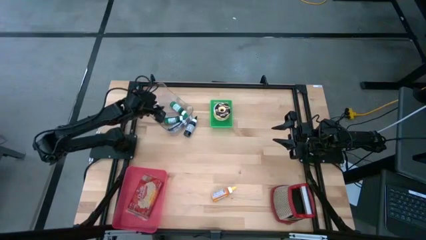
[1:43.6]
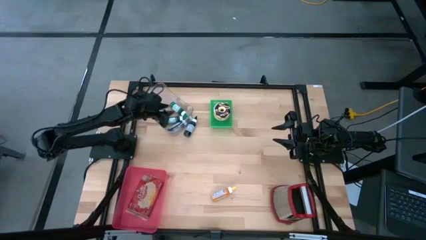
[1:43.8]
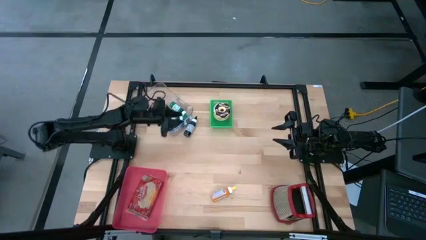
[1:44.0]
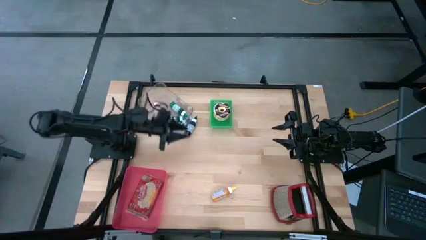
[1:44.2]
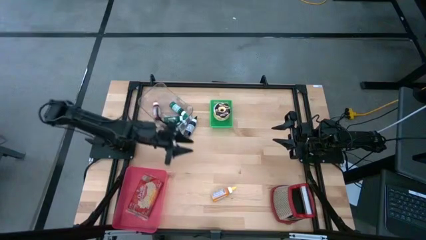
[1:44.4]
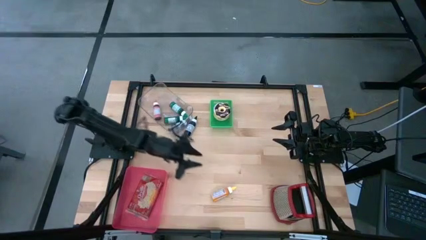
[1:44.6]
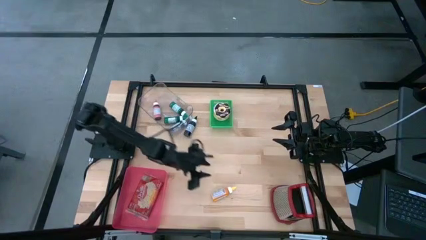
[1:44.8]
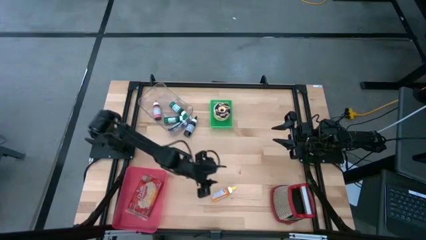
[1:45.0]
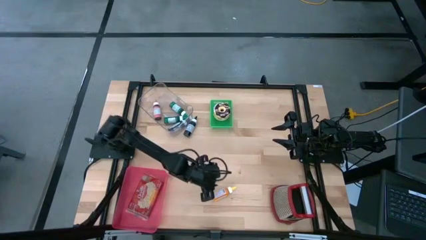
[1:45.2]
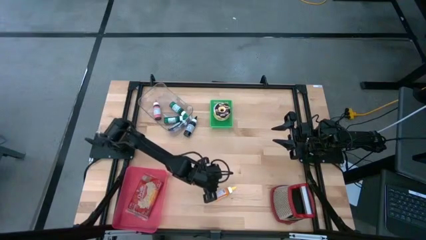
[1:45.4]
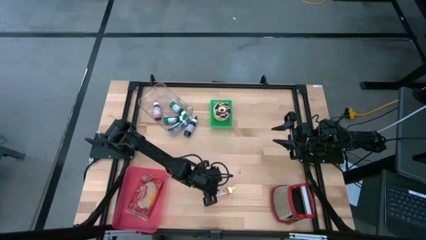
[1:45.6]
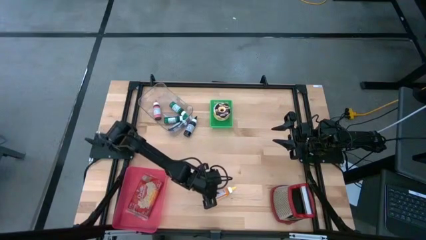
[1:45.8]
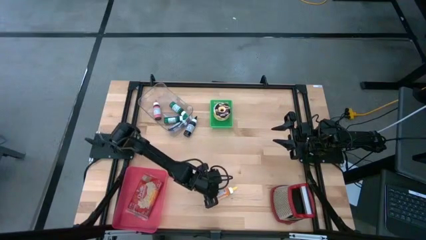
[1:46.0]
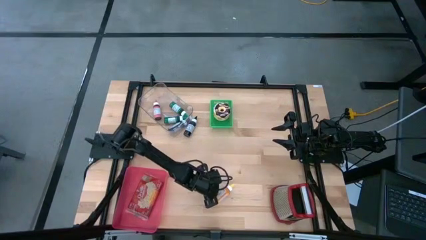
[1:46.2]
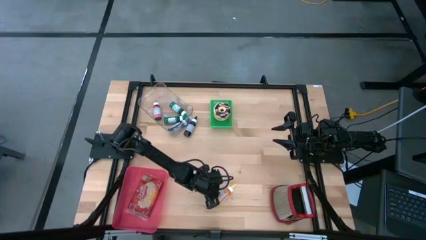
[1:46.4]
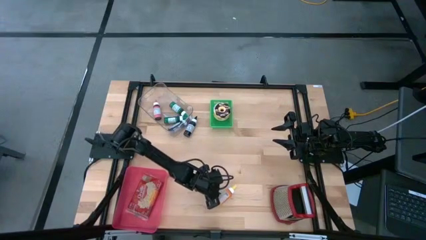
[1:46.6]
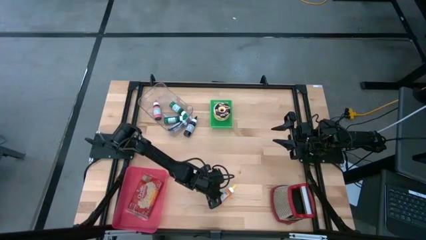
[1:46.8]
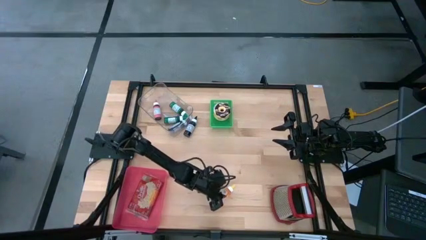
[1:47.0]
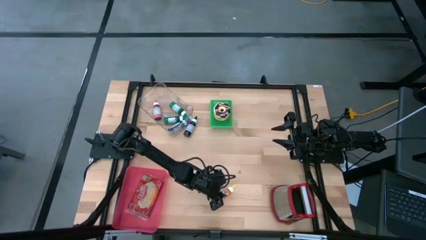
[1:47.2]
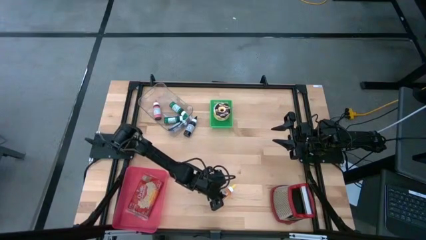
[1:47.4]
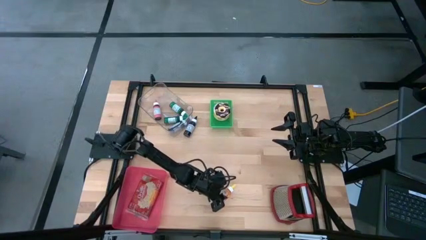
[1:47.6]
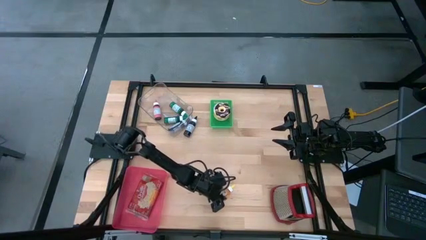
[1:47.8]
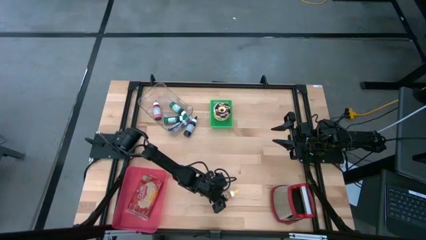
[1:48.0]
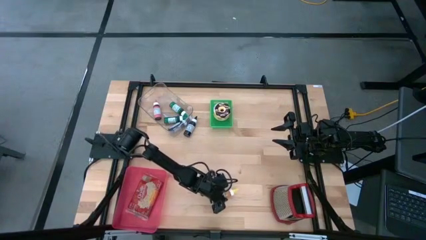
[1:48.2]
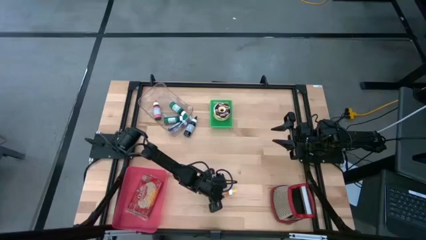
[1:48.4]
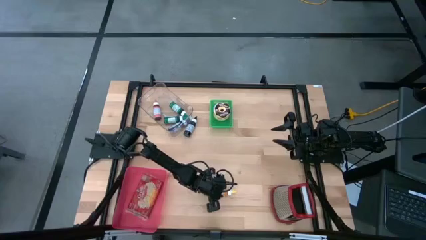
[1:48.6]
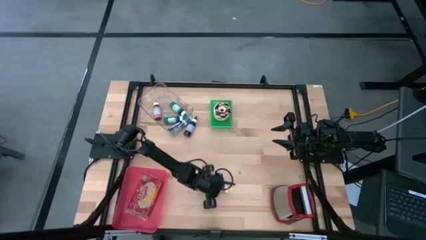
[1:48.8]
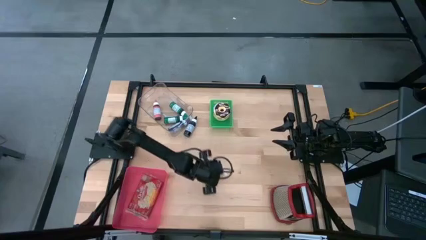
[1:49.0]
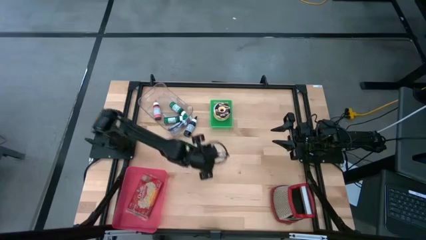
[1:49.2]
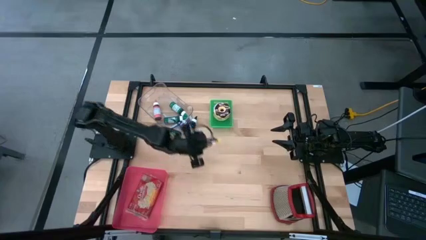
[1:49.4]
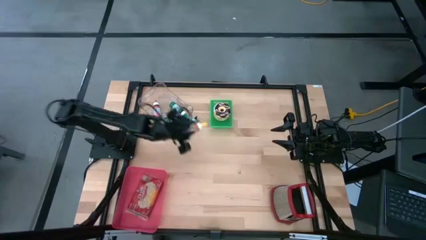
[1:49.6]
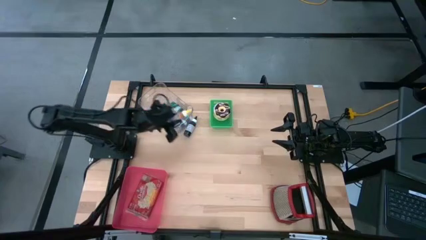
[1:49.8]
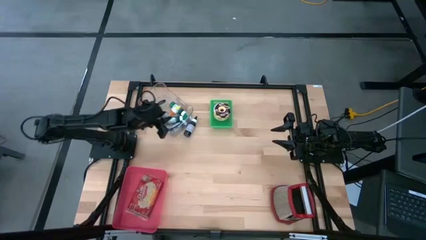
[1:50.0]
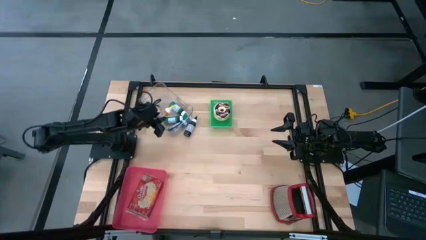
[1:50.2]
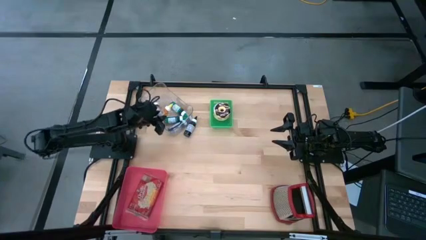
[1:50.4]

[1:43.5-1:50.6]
Put the yellow food coloring bottle into the transparent bin

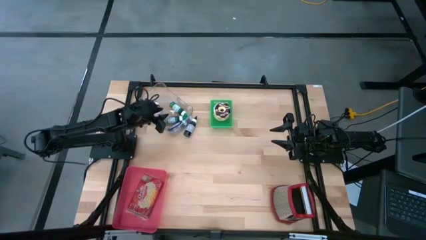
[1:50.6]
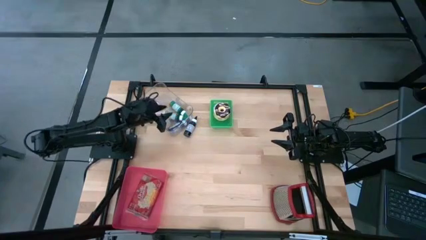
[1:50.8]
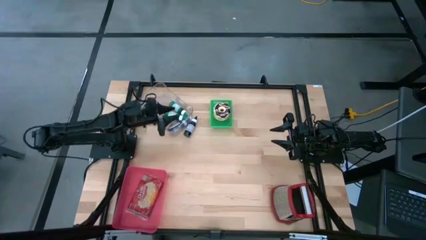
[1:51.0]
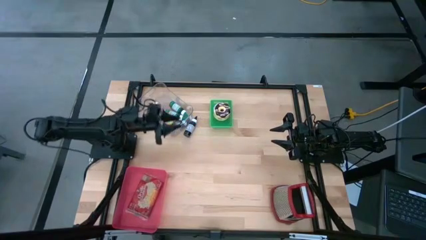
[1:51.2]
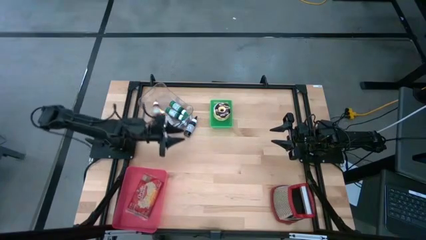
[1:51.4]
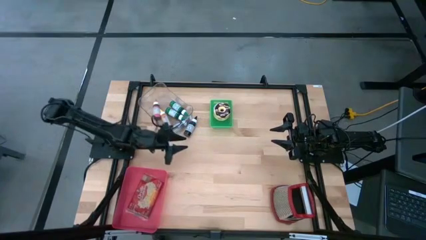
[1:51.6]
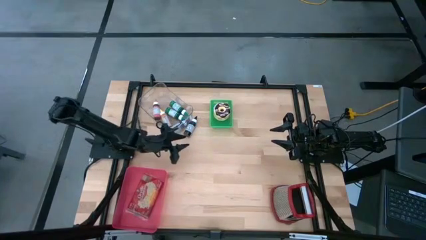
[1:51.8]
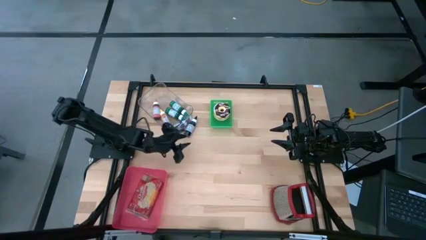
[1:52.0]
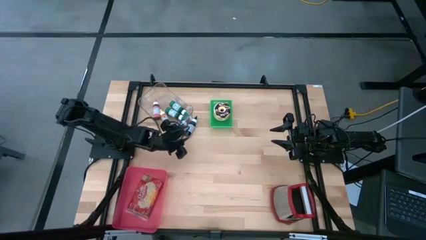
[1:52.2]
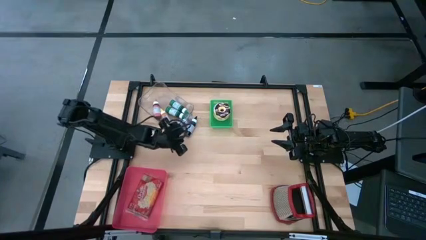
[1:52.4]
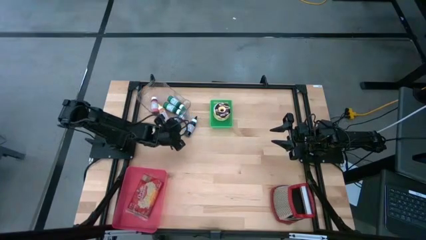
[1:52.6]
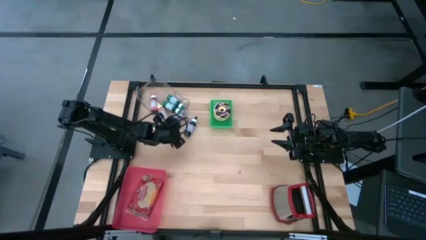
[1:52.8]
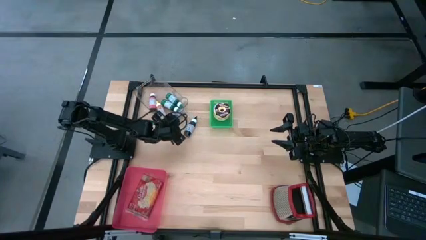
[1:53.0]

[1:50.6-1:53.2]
Adjust the transparent bin

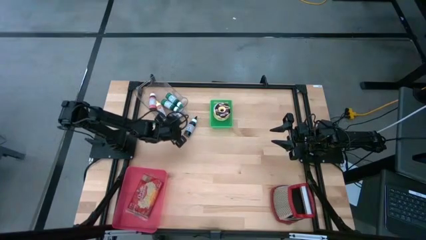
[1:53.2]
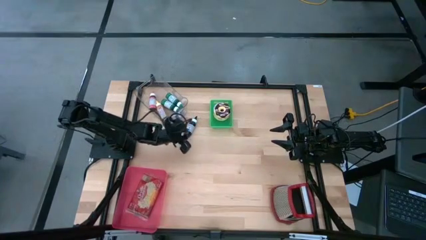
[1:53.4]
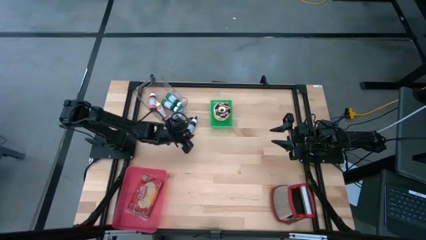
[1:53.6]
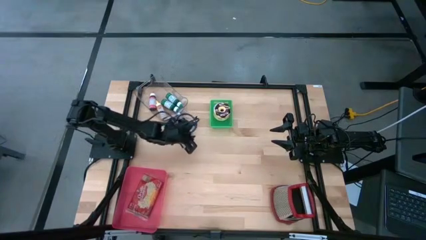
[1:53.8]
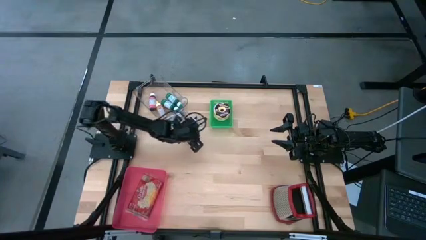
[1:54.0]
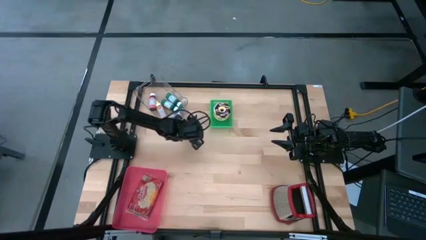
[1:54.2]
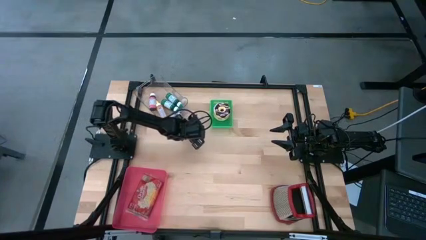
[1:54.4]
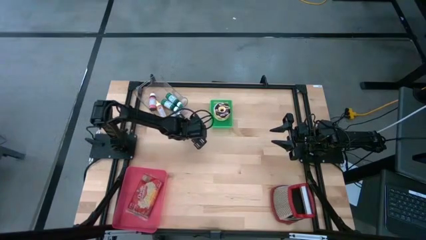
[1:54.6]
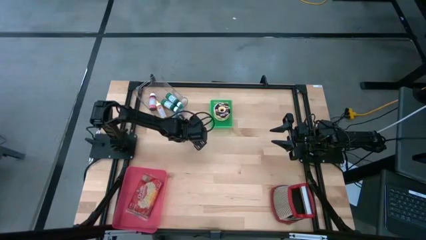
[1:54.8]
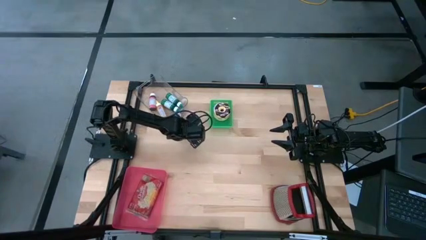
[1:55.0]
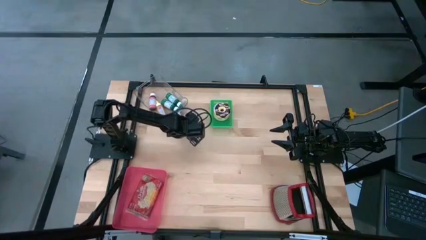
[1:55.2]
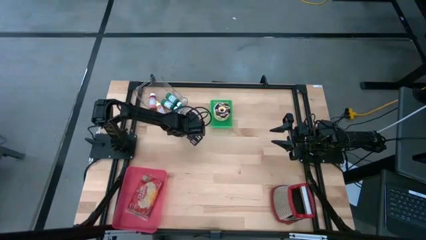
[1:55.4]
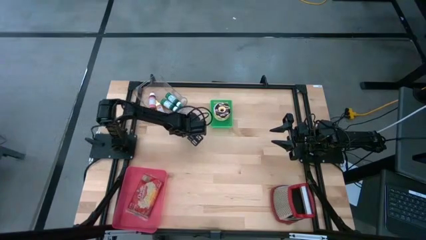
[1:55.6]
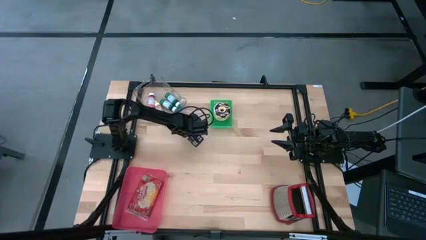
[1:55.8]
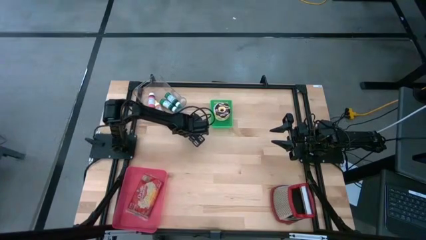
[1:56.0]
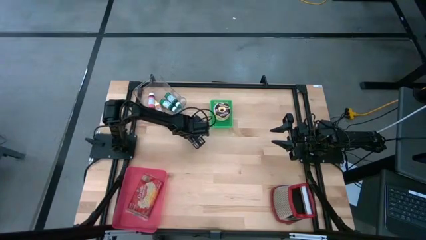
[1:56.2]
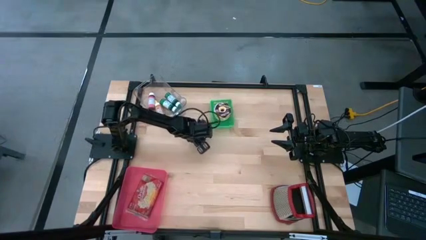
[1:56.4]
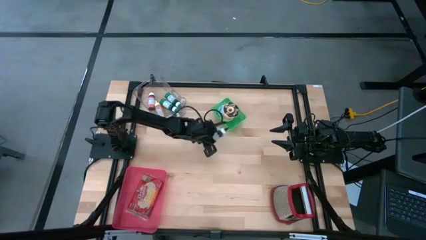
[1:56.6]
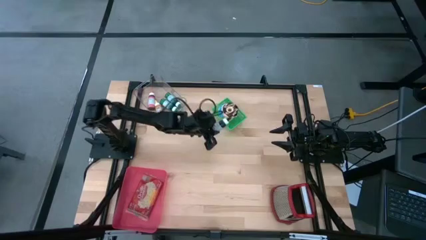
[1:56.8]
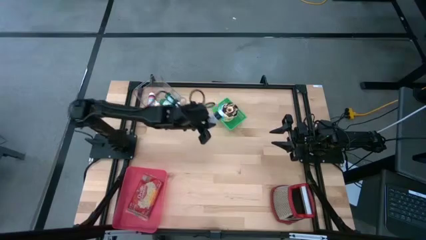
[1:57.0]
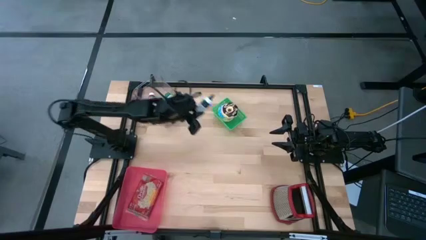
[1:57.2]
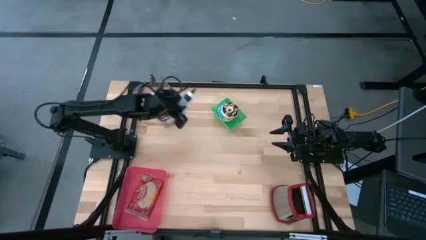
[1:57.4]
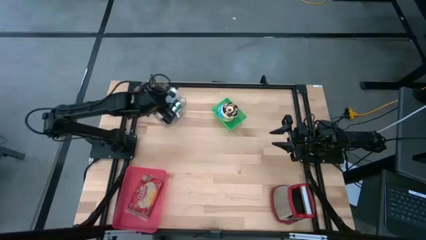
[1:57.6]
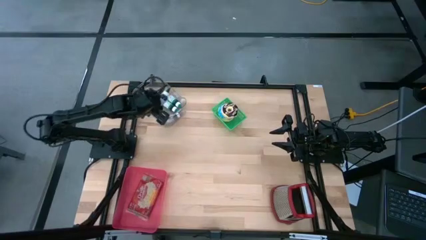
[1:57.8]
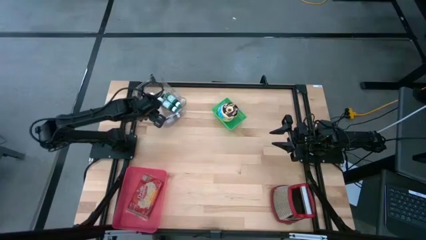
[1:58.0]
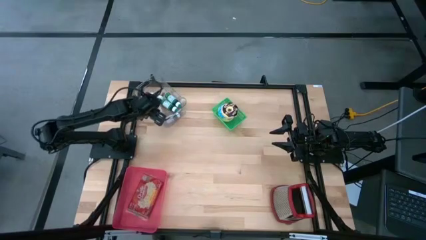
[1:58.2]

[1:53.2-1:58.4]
Put the black food coloring bottle into the transparent bin
